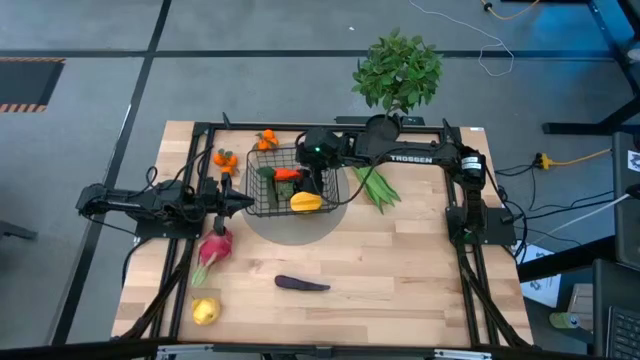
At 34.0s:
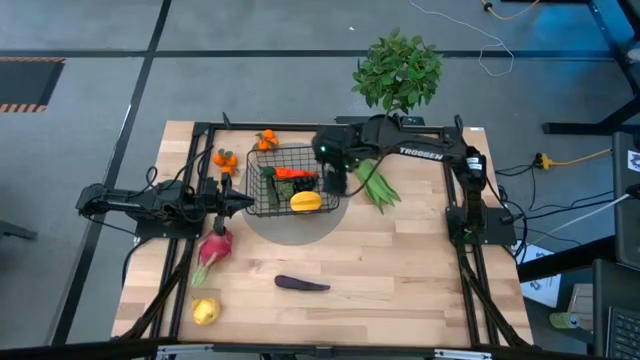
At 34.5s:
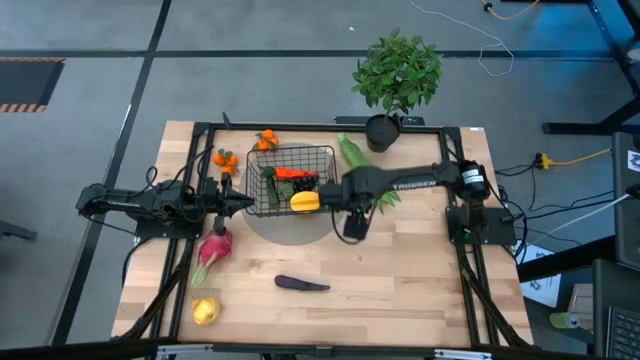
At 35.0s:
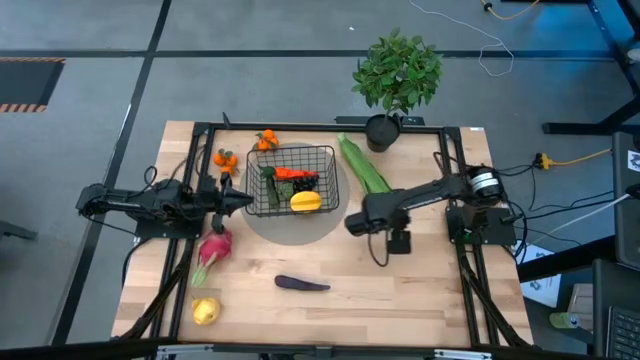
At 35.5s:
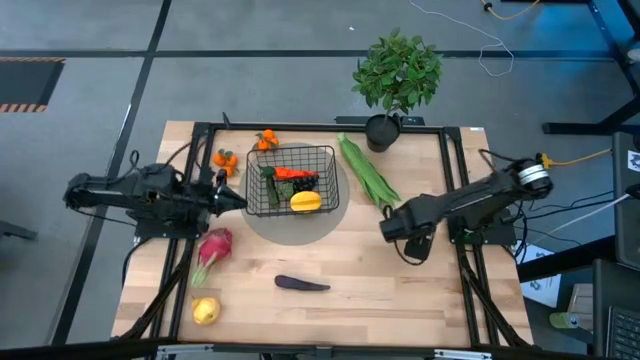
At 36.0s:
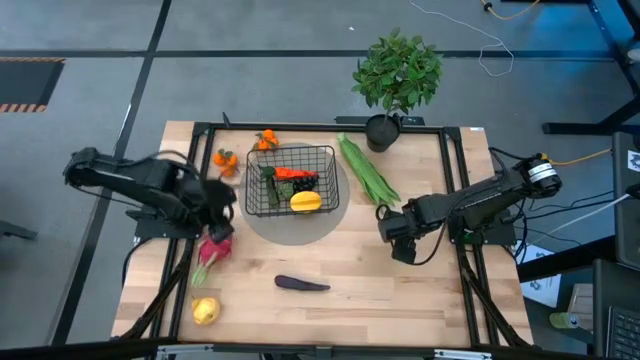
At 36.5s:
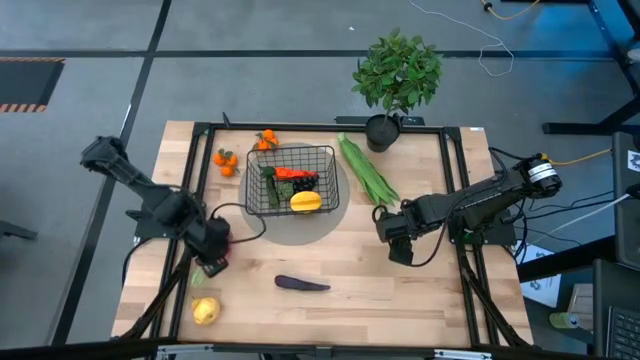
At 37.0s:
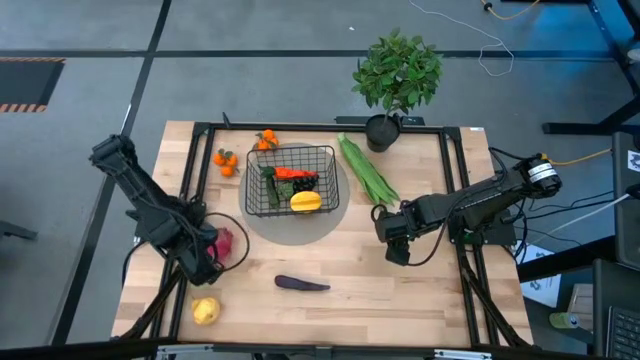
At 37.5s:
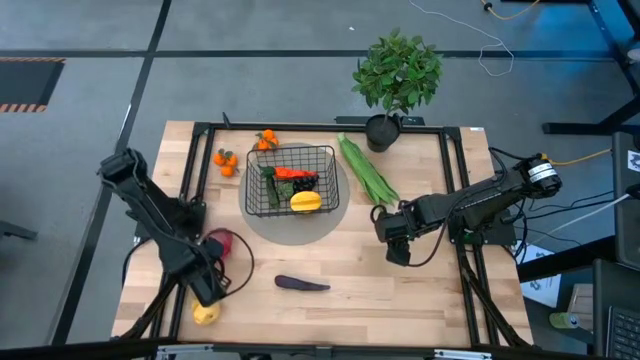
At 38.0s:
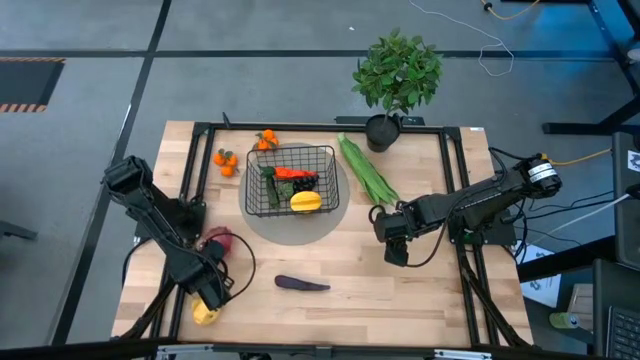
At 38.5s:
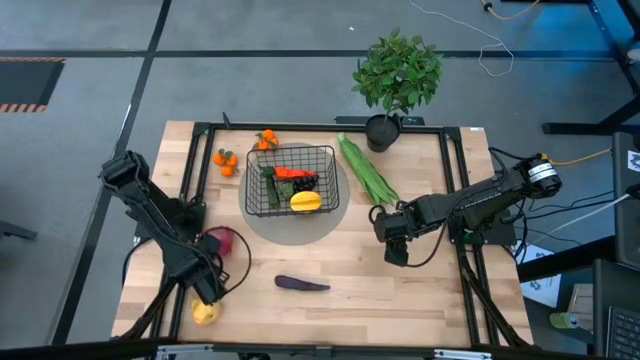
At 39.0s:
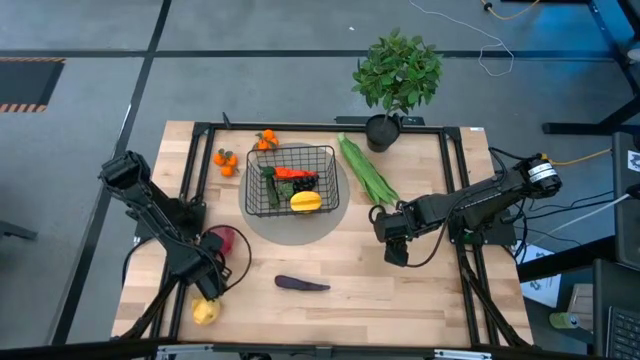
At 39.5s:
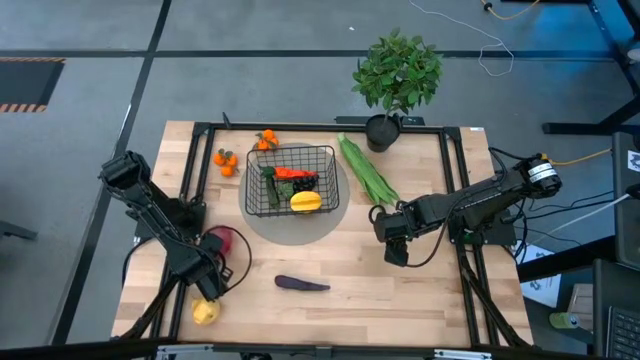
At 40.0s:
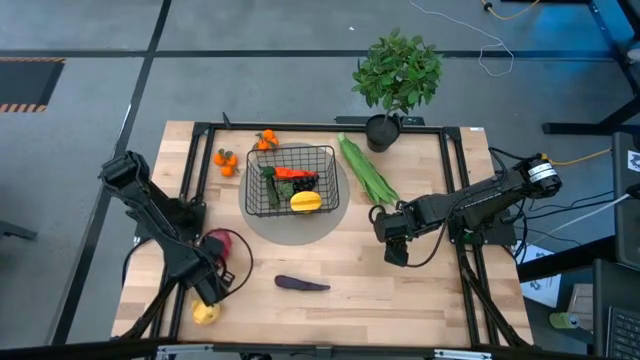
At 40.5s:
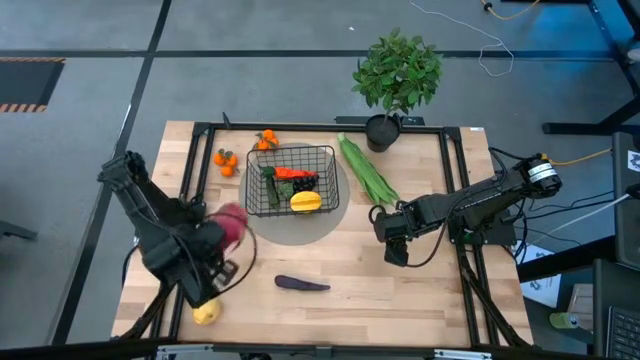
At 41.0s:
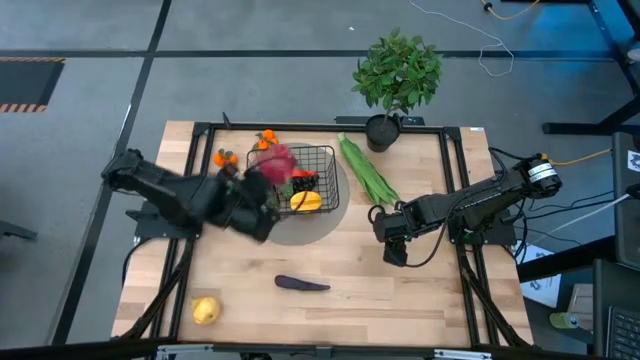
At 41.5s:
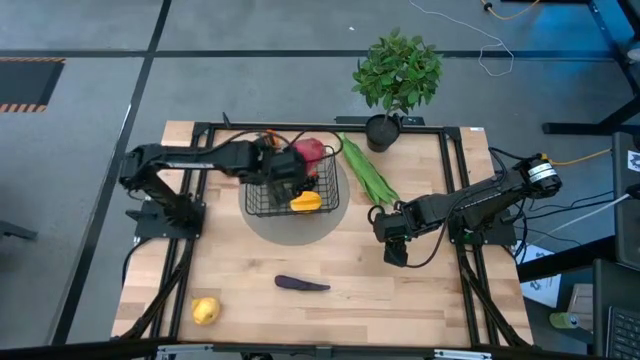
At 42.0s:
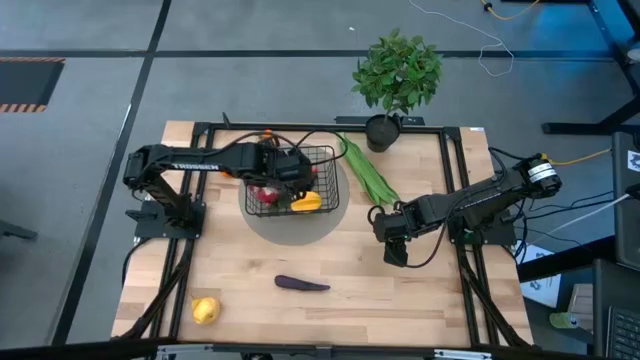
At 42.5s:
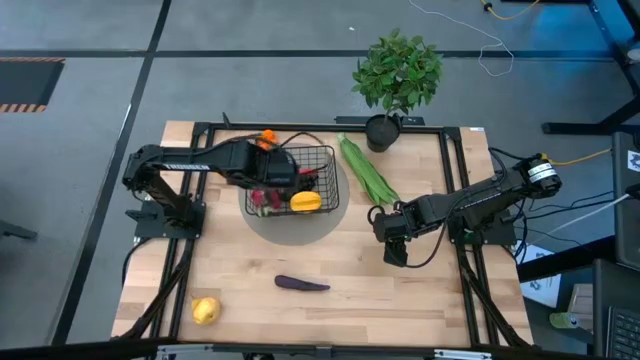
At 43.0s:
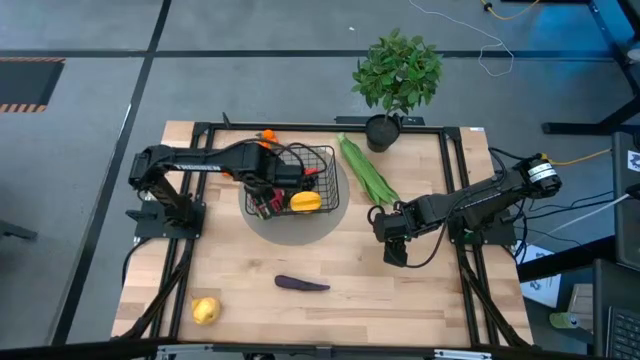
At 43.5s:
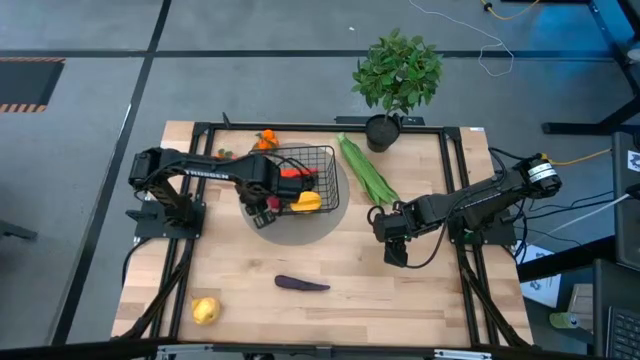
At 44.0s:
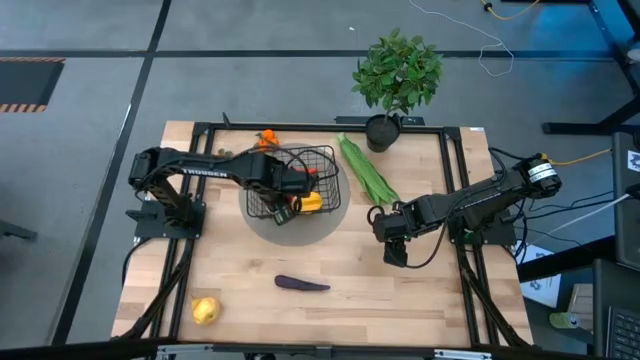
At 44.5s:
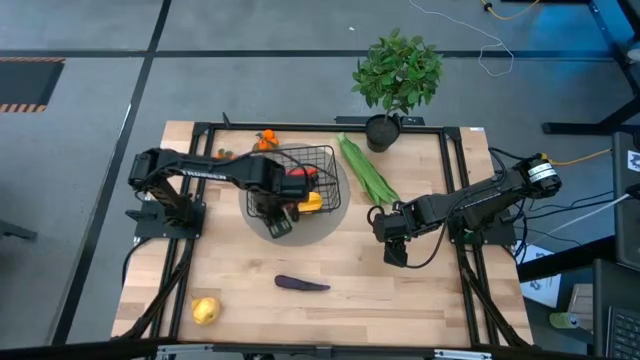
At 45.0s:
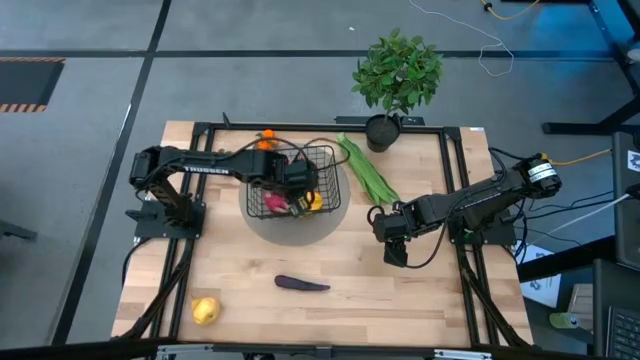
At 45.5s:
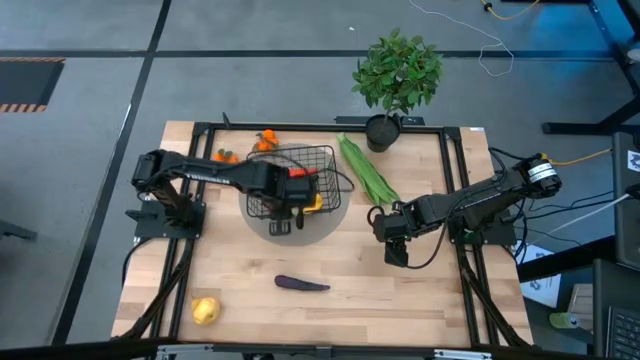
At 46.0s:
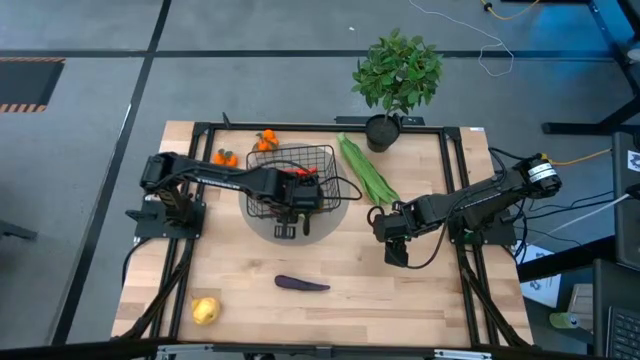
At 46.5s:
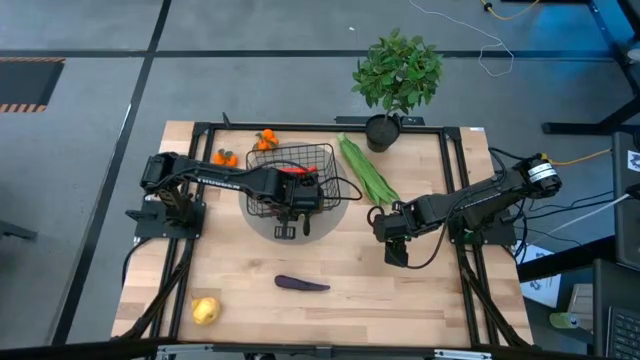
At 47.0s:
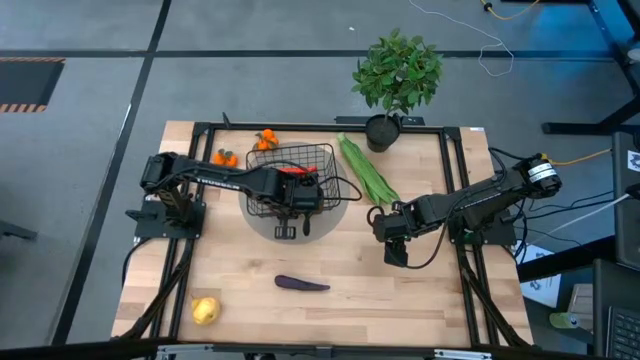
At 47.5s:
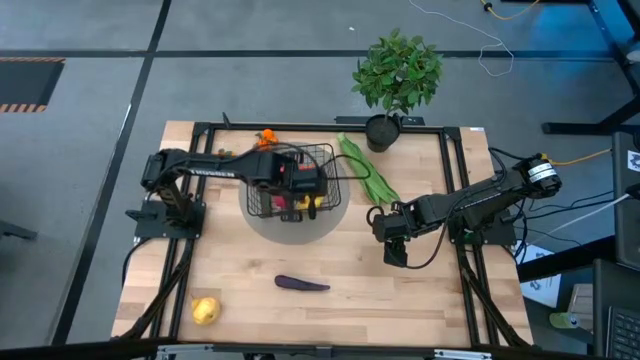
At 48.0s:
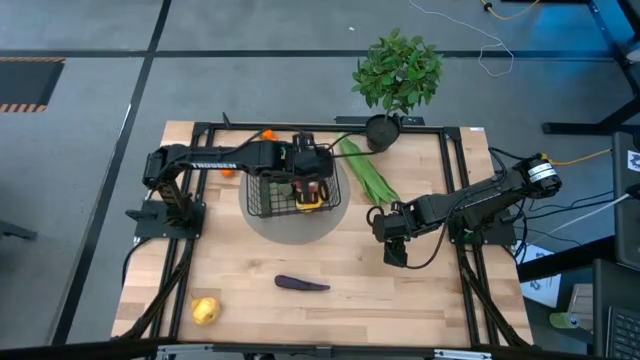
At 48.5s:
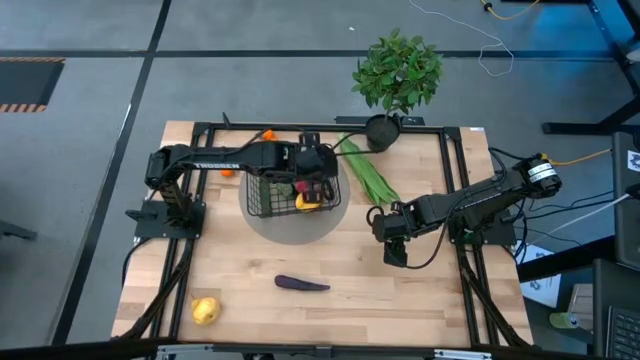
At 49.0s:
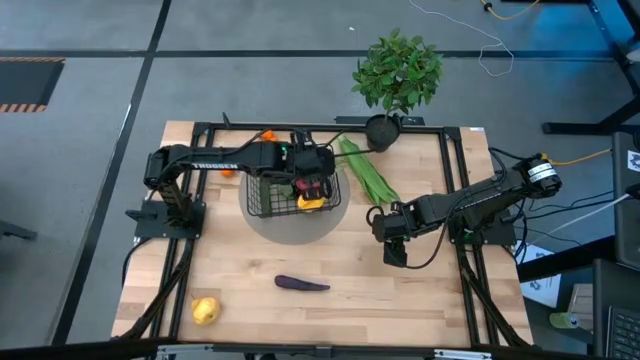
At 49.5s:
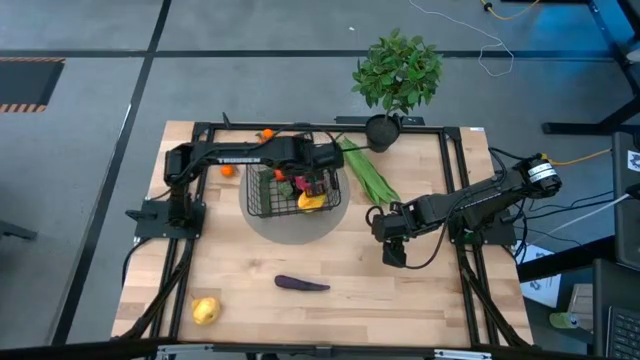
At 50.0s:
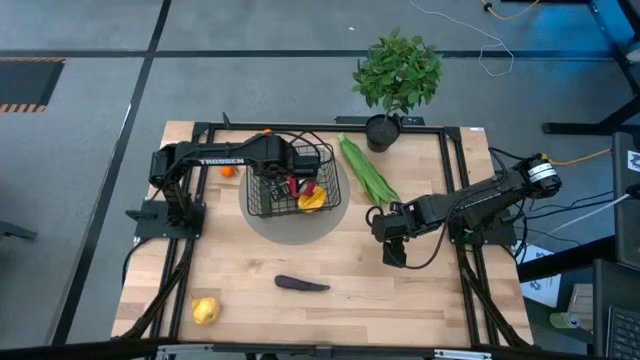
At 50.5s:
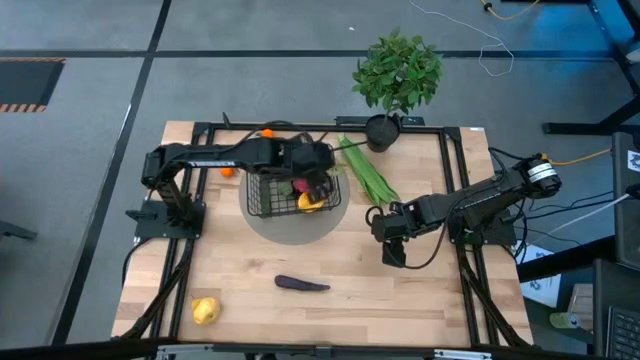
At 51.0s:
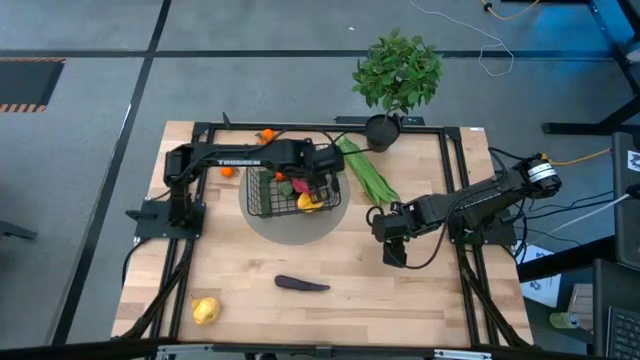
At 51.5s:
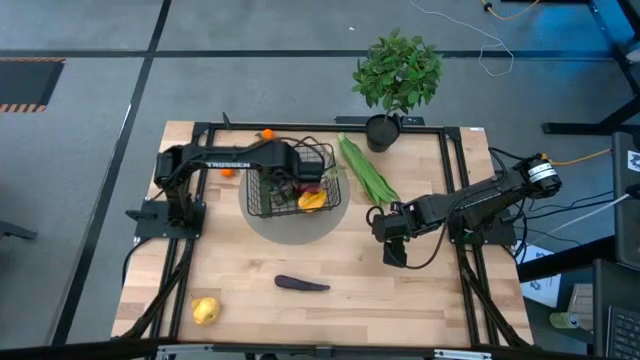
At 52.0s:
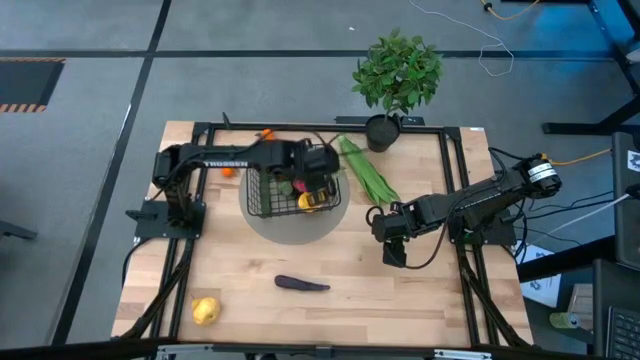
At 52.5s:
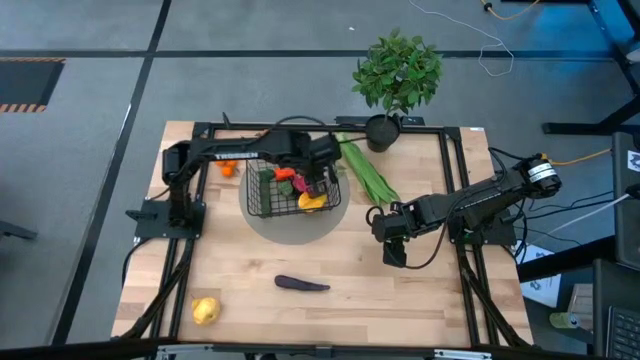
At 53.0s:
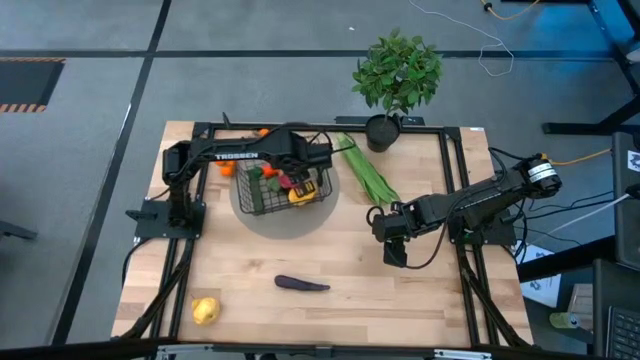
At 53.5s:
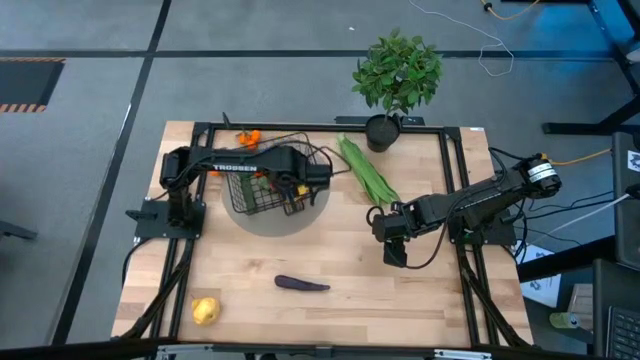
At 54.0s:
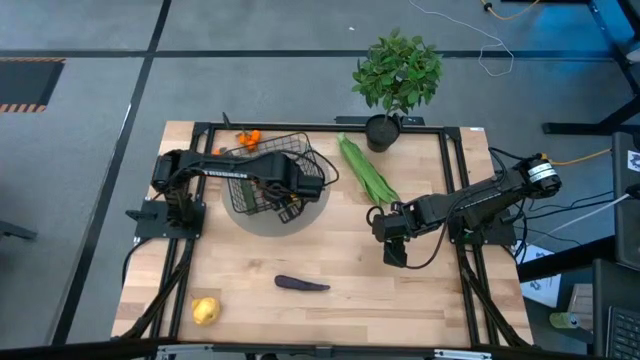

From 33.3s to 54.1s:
Task: Build produce basket
Put the pink dragonfruit into the black wire basket

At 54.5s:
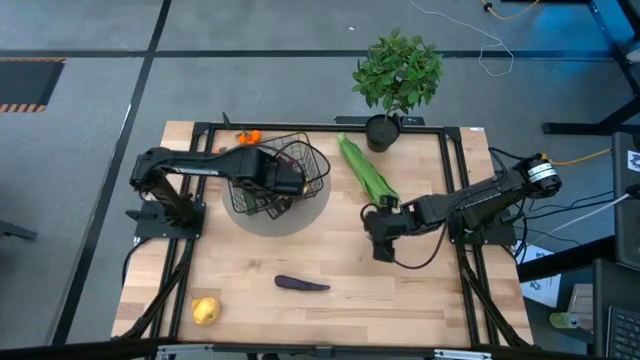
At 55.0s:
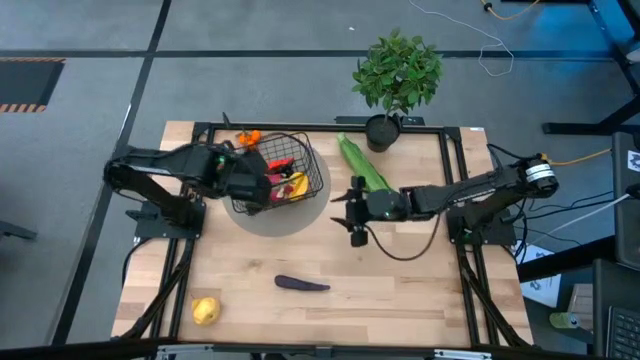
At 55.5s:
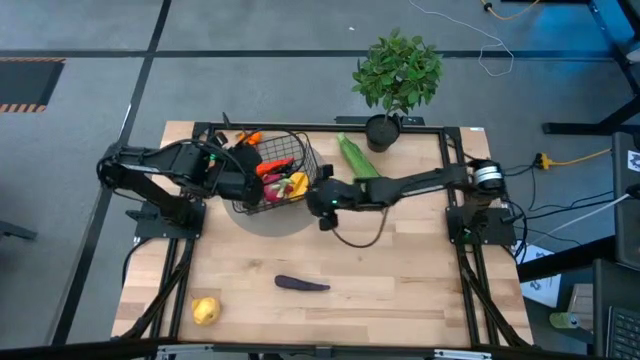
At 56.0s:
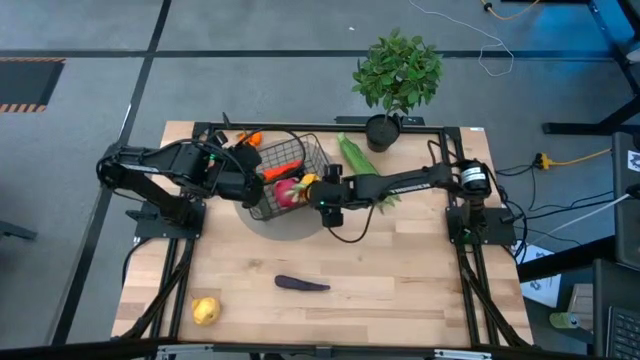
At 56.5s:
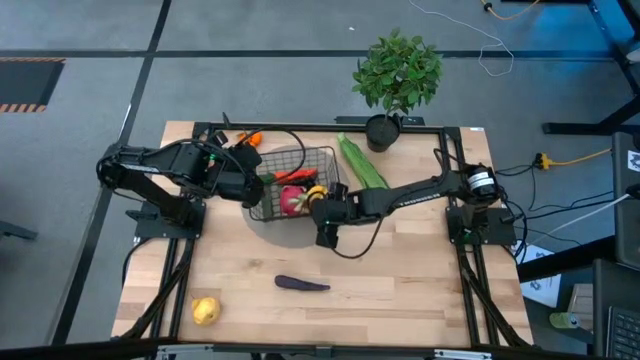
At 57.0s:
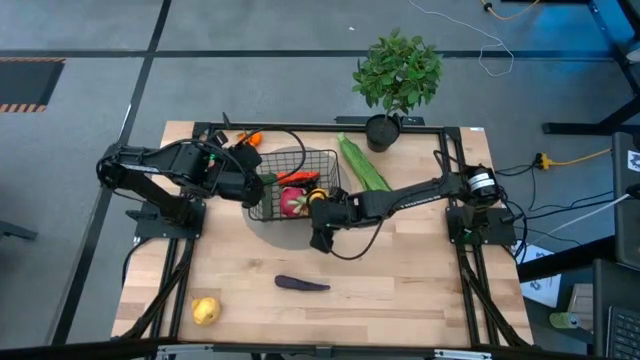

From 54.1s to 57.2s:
Adjust the black wire basket
